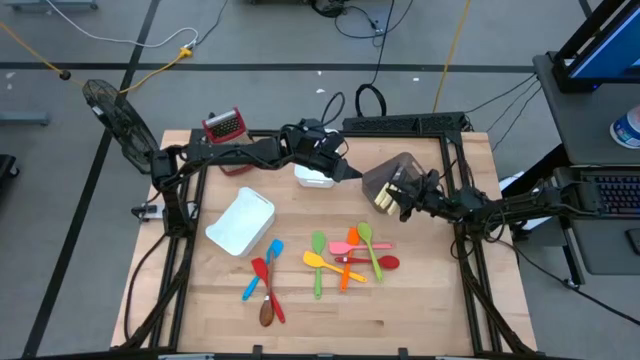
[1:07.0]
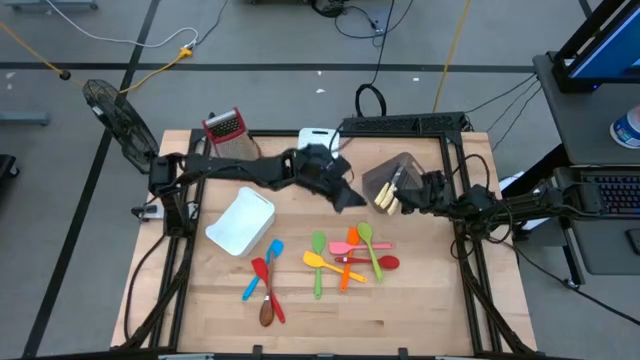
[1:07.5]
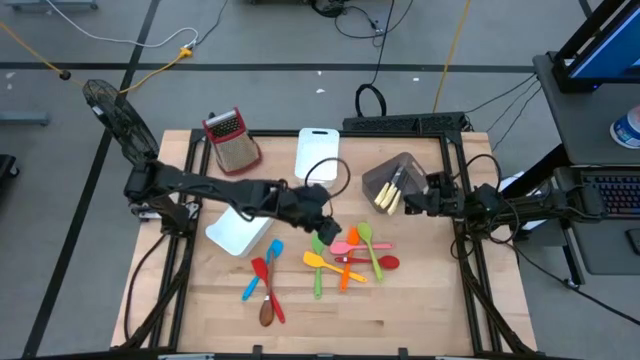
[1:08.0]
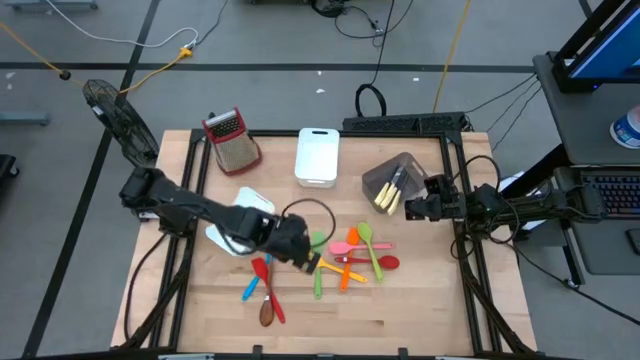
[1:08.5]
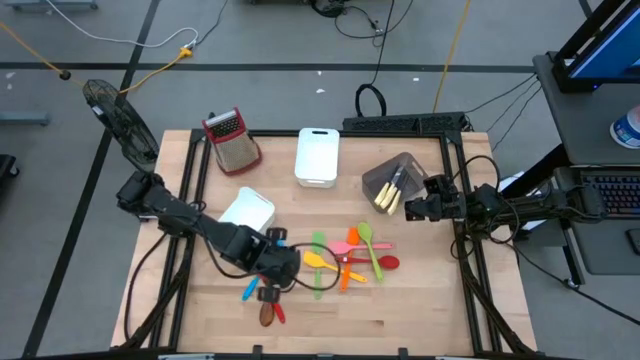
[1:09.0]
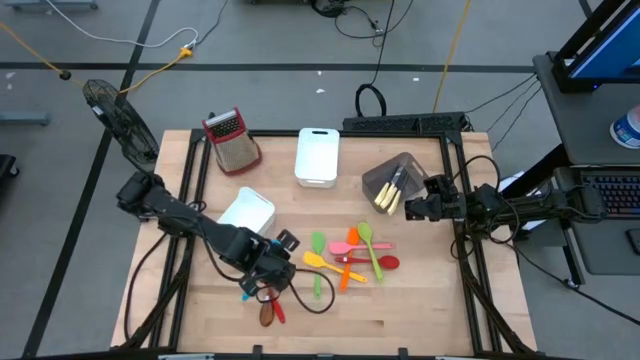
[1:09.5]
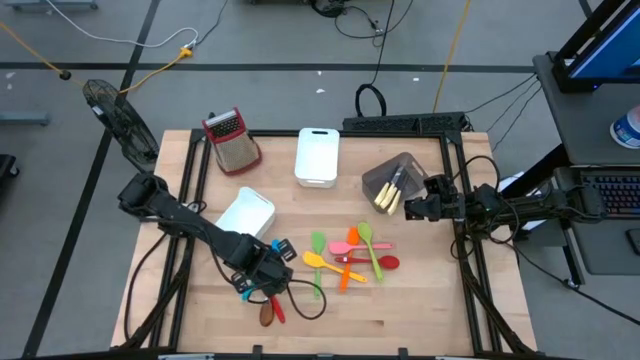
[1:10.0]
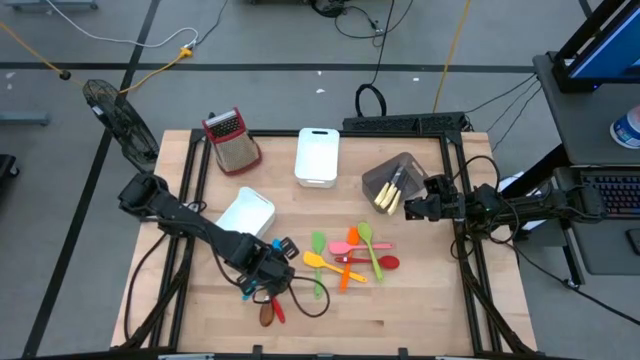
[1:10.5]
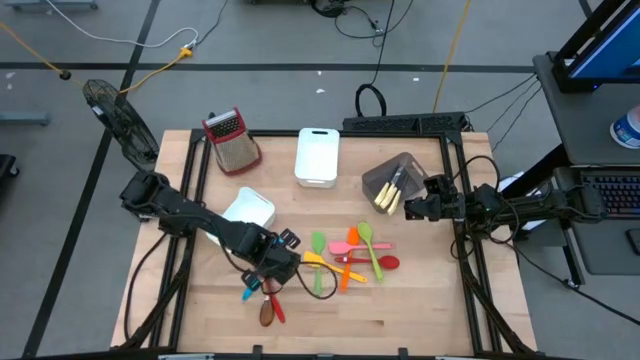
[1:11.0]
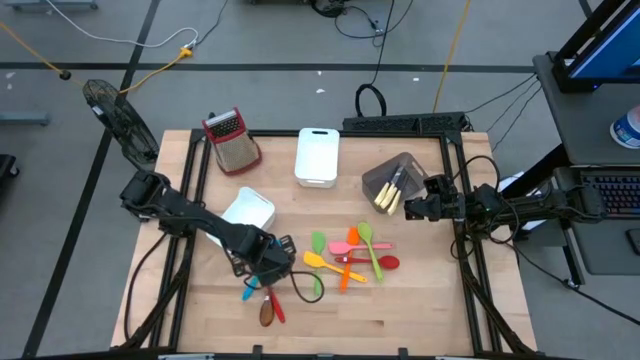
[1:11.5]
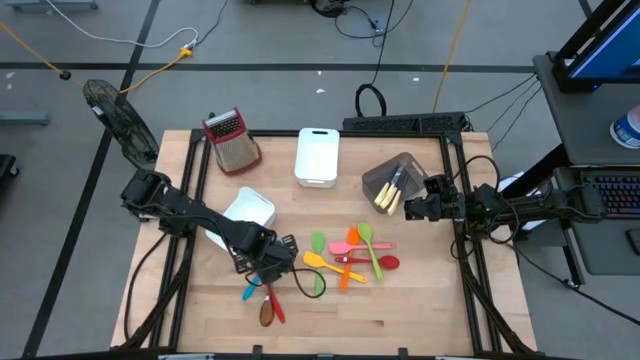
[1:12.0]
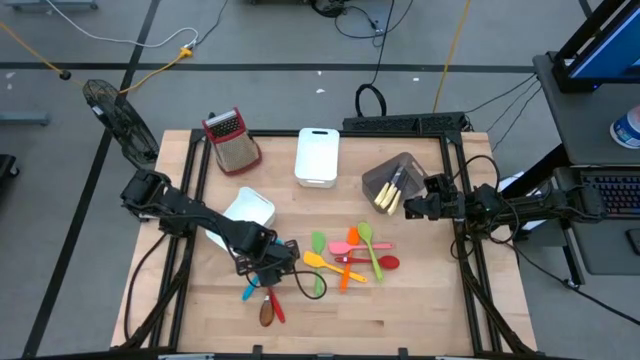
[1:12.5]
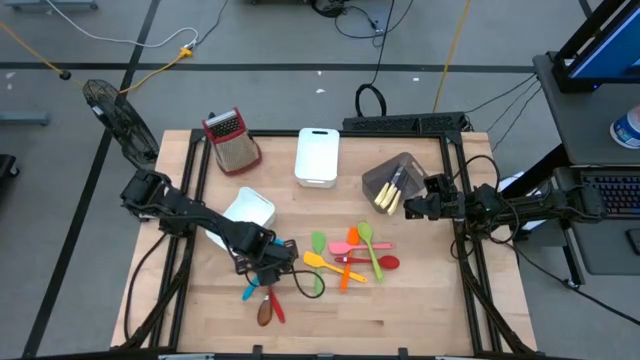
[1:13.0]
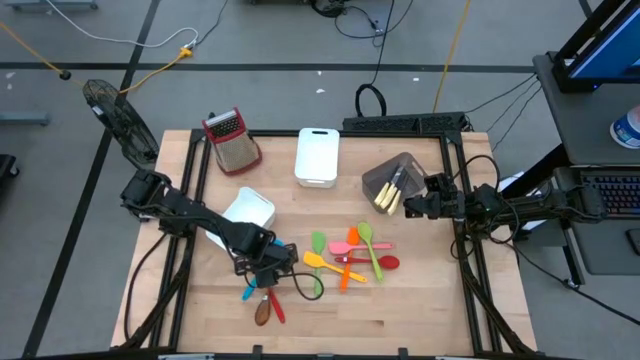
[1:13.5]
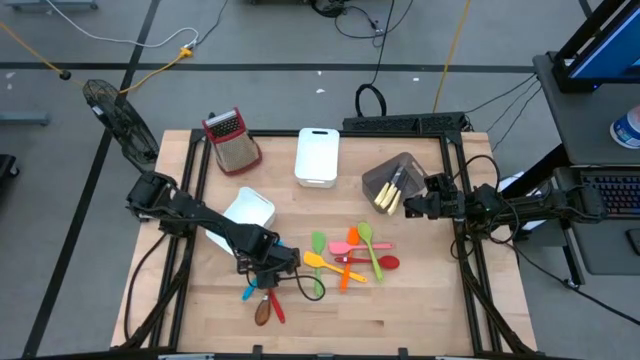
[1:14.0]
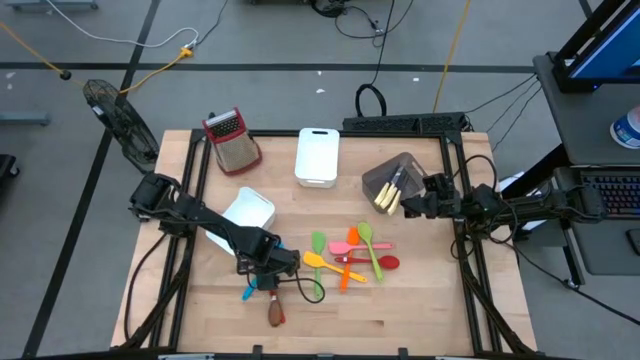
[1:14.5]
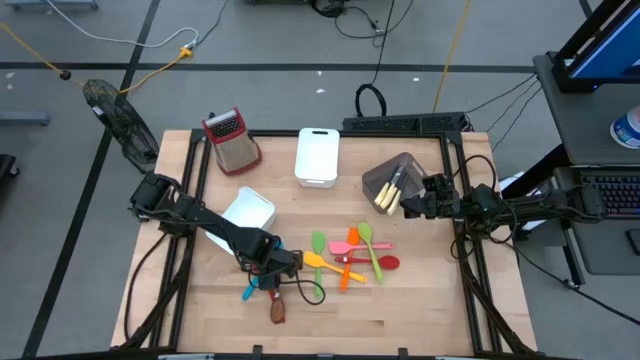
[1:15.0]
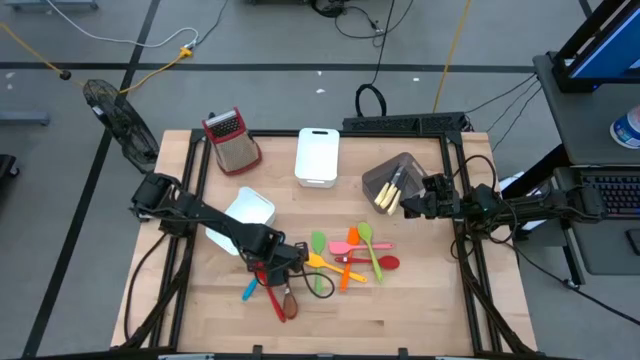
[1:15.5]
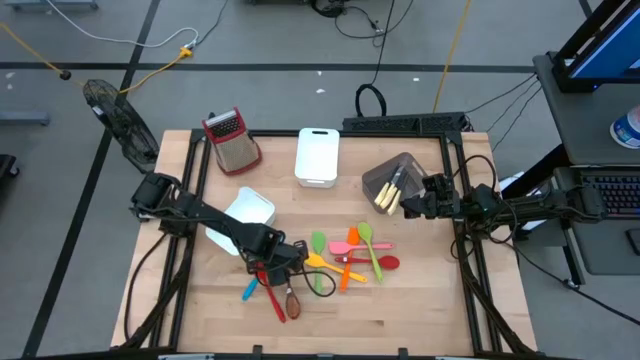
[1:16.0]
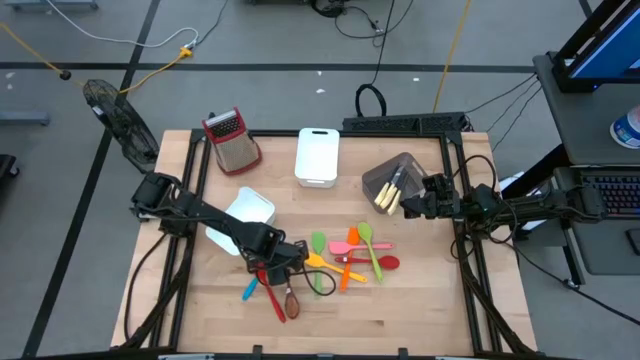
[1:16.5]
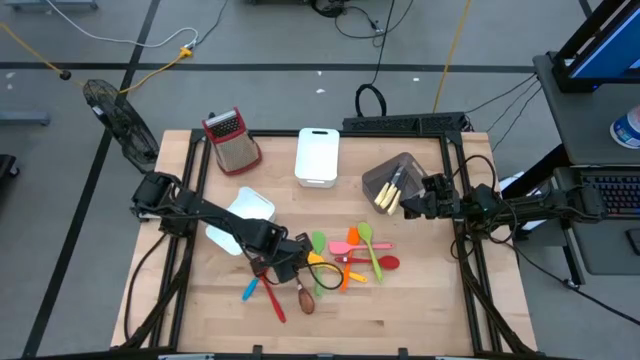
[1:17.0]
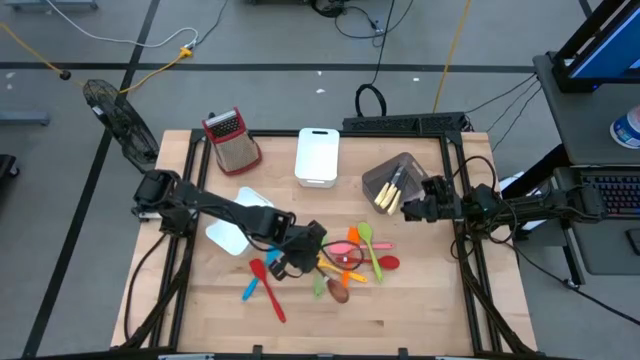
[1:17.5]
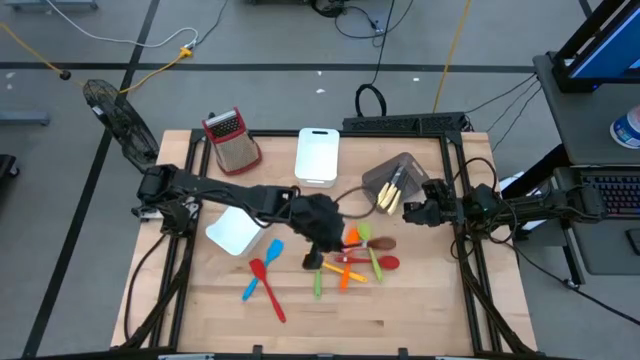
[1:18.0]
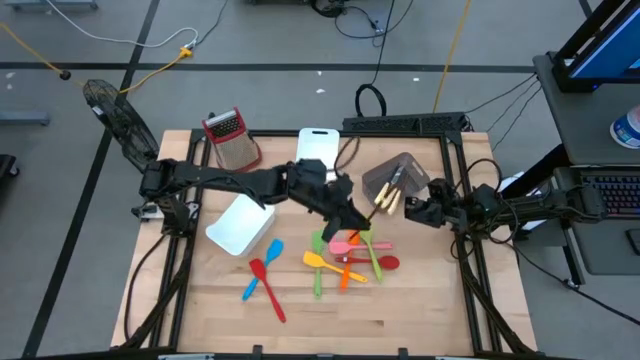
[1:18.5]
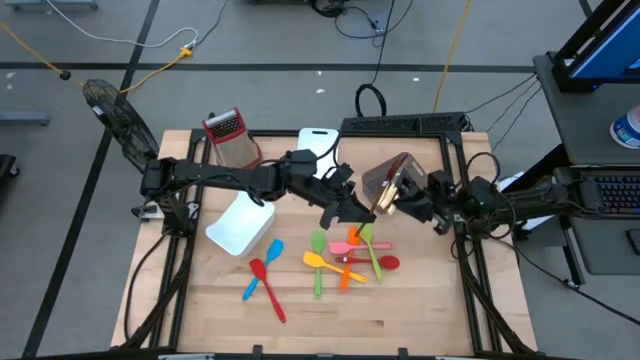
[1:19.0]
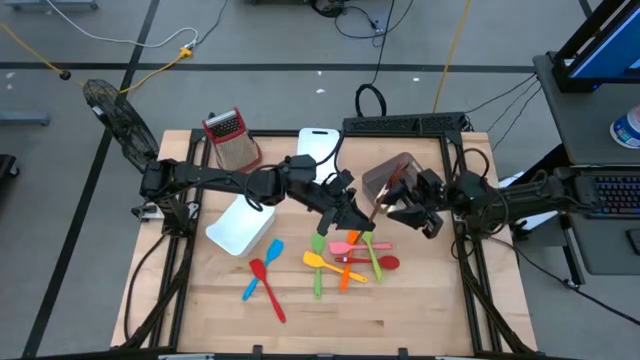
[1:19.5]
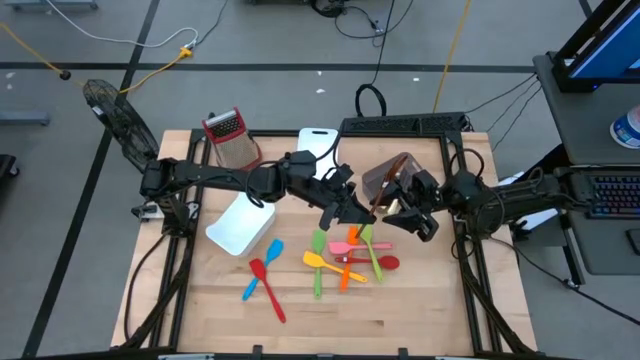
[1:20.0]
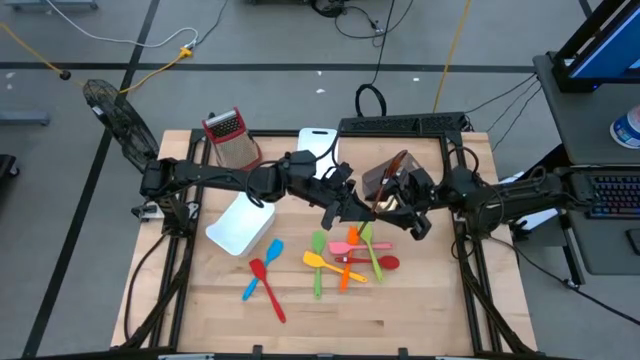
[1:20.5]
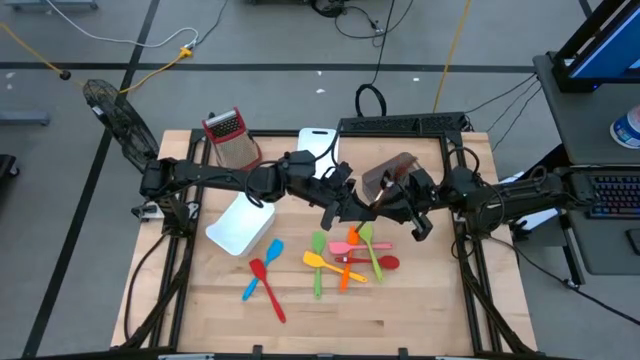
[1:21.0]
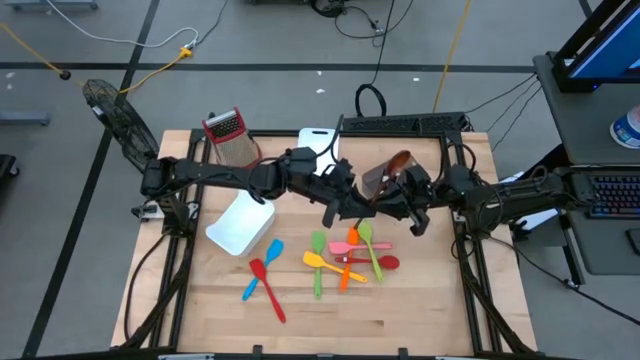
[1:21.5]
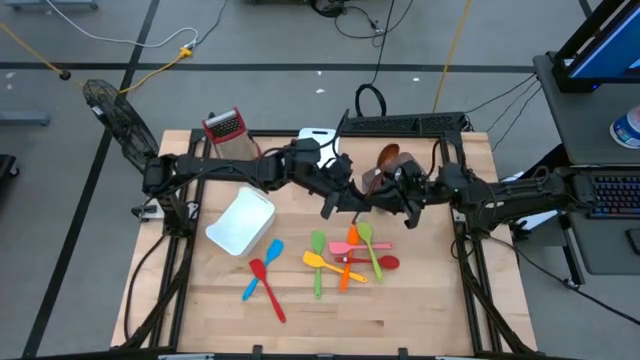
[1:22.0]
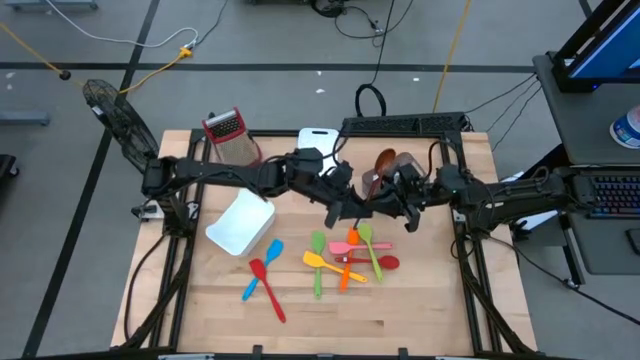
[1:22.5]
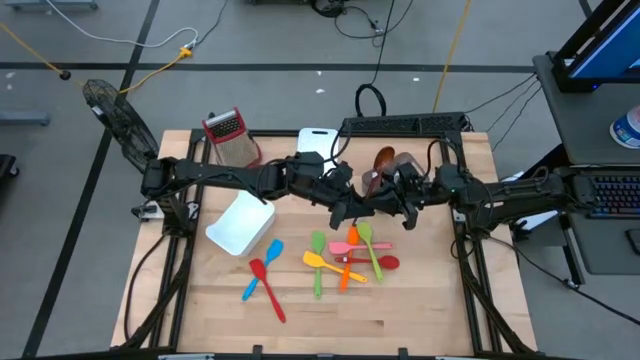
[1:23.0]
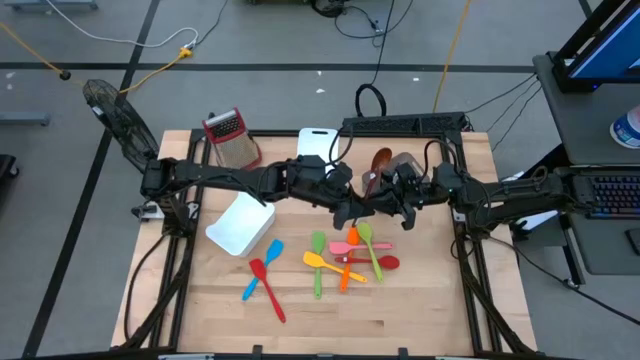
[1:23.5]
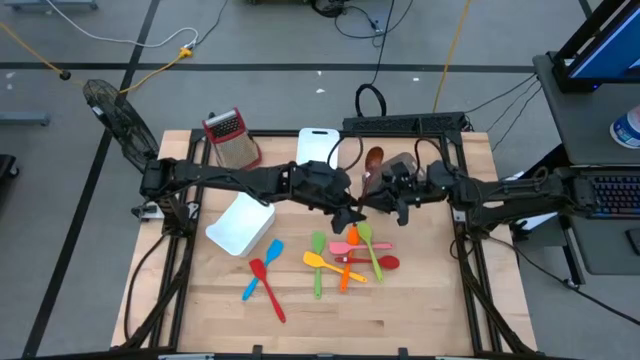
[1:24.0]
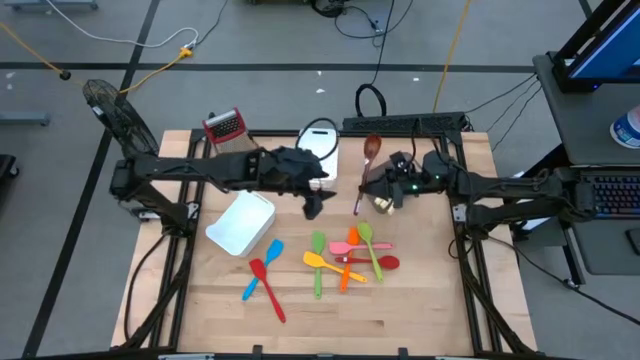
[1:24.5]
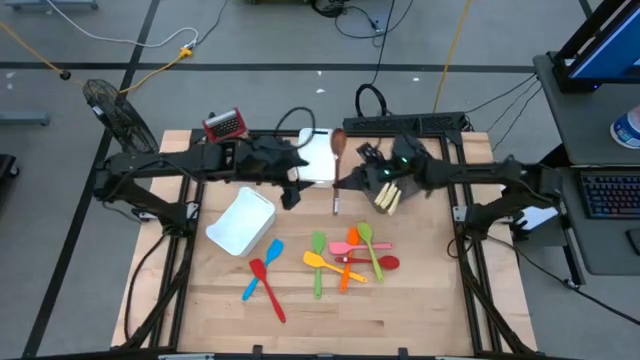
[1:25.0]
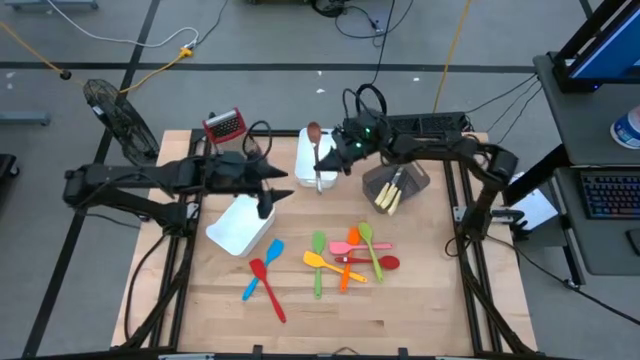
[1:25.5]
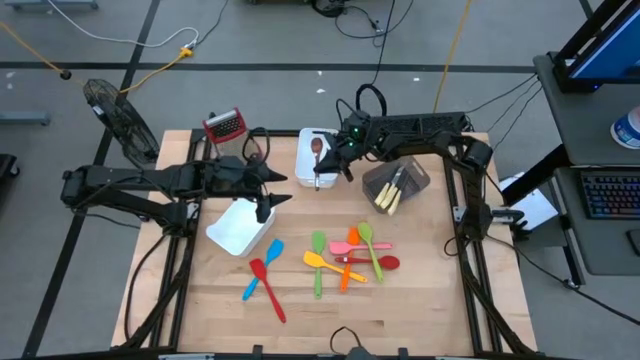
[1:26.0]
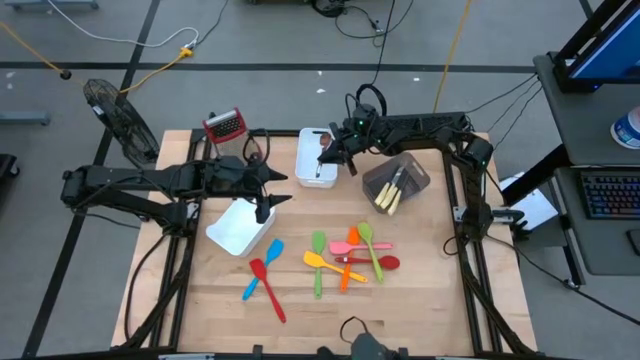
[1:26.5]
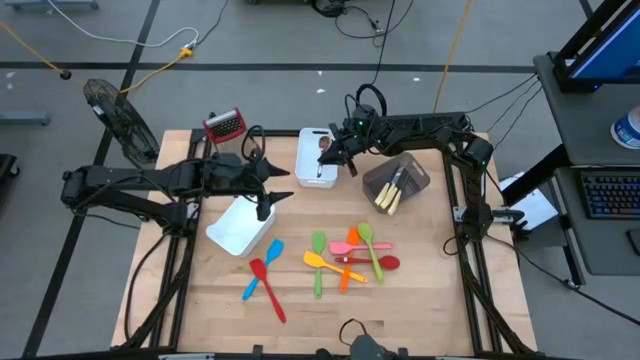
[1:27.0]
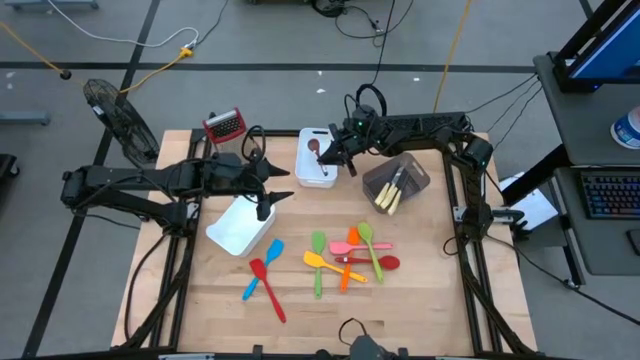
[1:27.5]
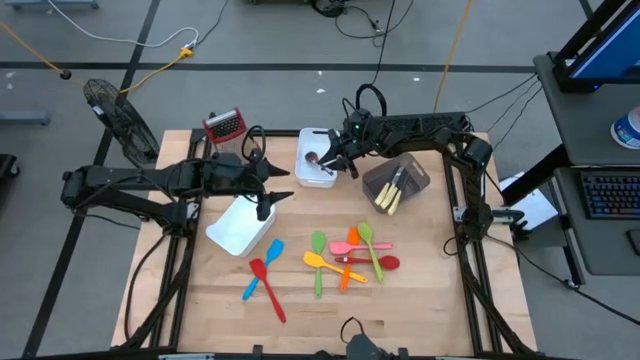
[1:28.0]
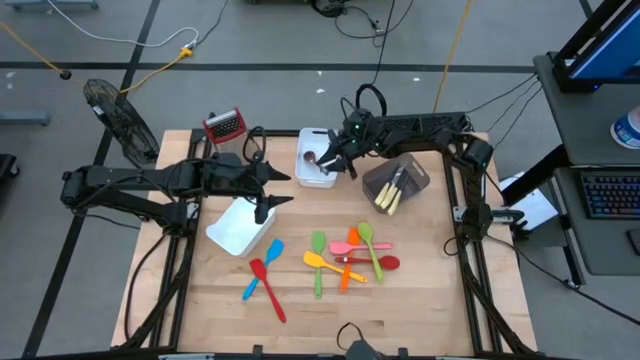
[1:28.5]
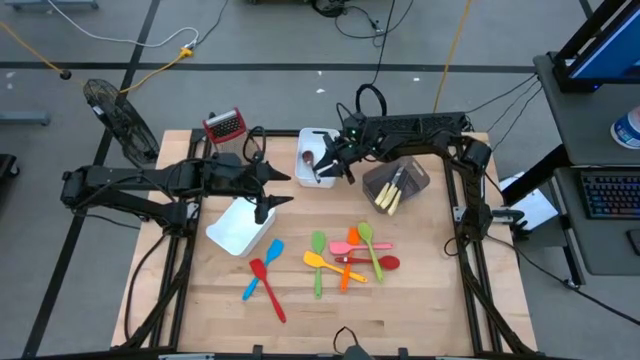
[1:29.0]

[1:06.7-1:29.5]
Task: Pick & Place Kitchen Items
Put the brown serving spoon into the top white bin
